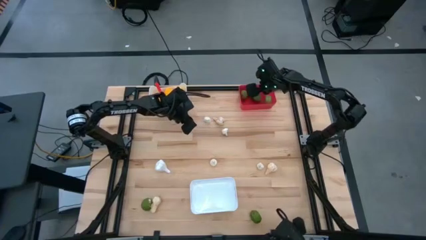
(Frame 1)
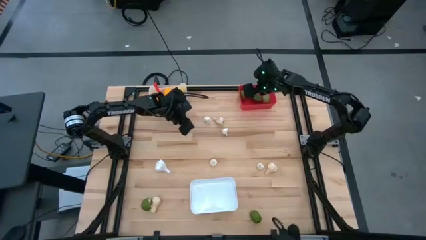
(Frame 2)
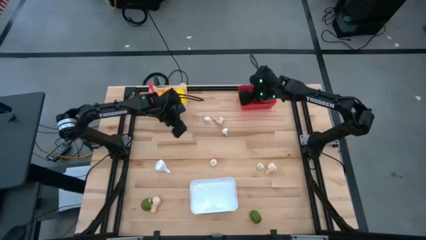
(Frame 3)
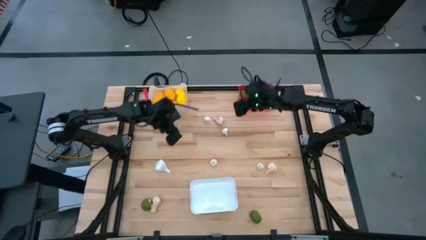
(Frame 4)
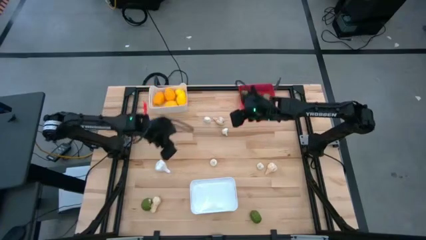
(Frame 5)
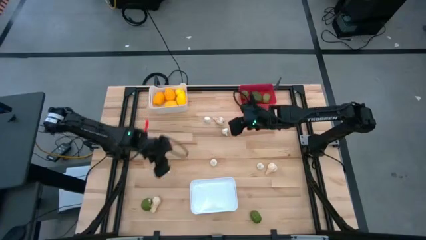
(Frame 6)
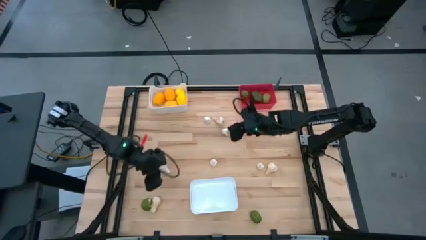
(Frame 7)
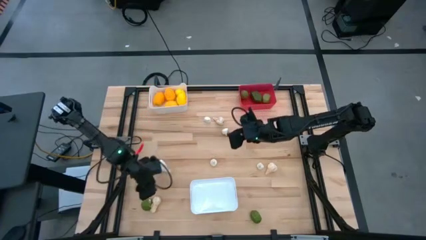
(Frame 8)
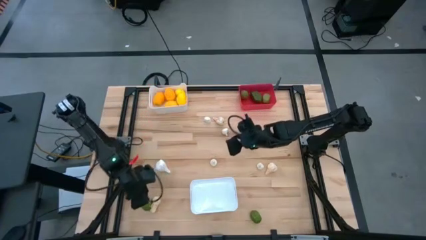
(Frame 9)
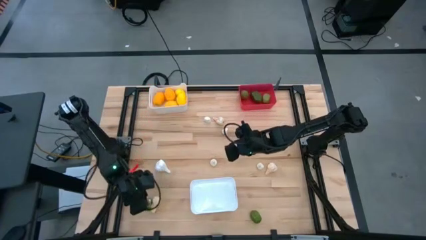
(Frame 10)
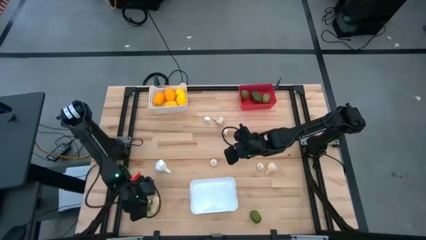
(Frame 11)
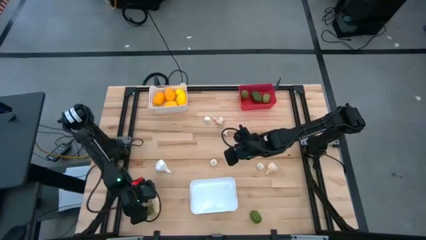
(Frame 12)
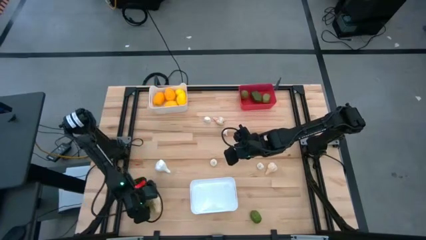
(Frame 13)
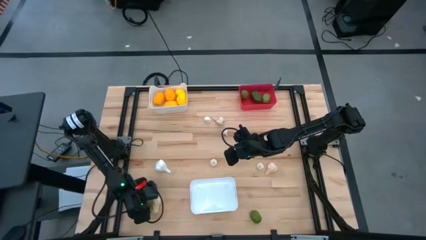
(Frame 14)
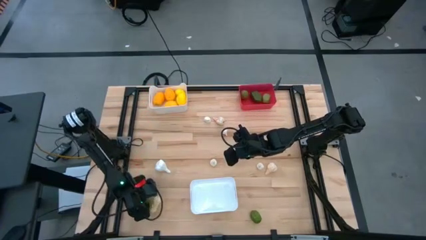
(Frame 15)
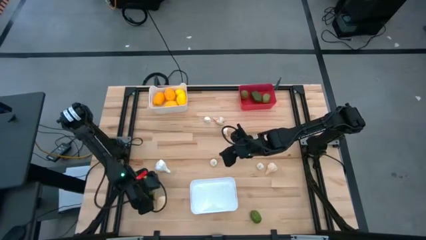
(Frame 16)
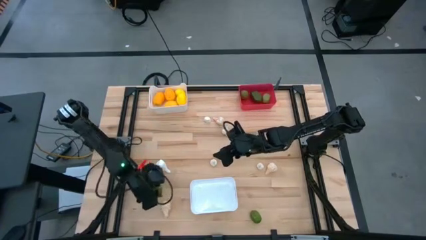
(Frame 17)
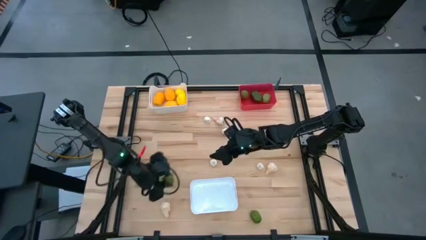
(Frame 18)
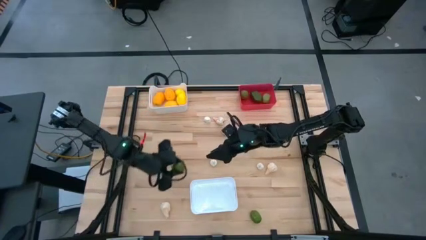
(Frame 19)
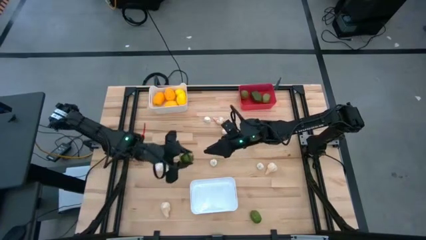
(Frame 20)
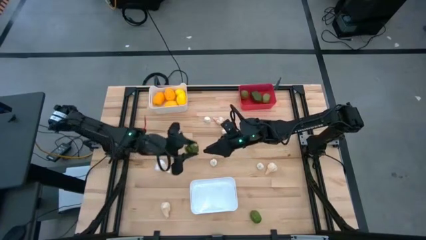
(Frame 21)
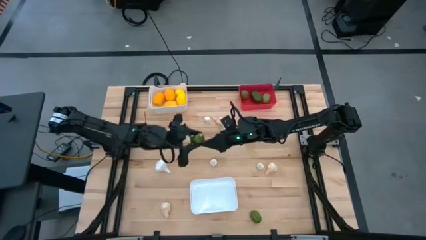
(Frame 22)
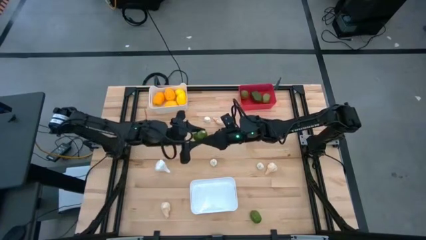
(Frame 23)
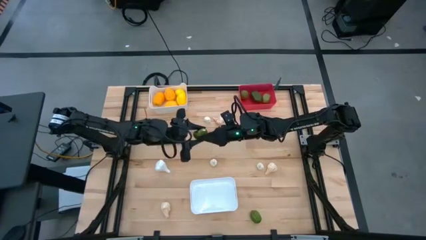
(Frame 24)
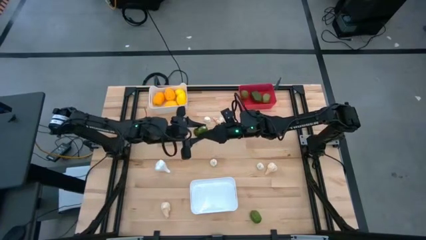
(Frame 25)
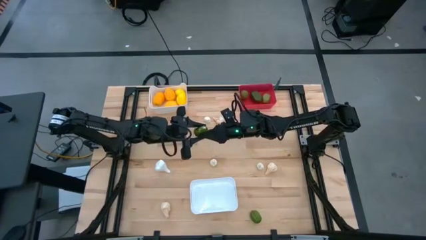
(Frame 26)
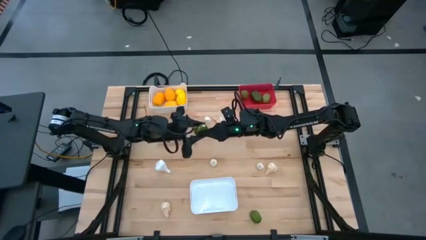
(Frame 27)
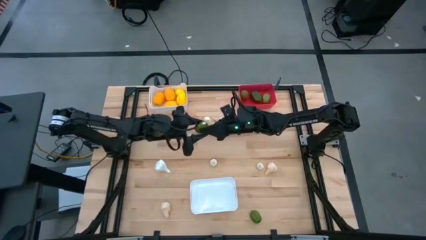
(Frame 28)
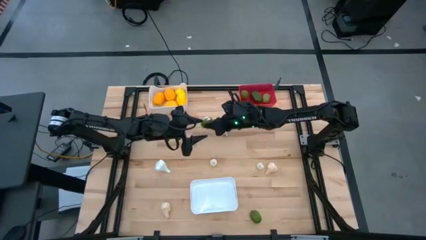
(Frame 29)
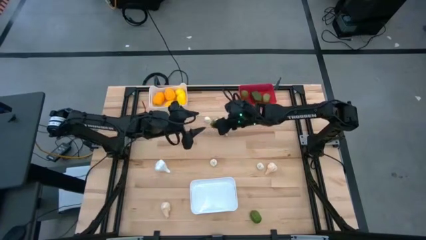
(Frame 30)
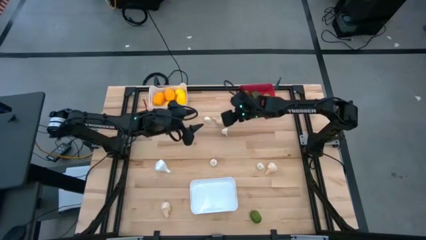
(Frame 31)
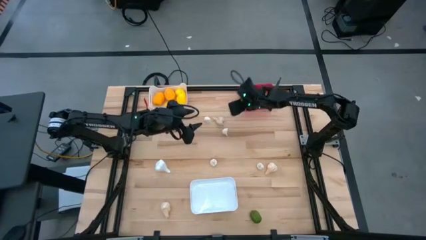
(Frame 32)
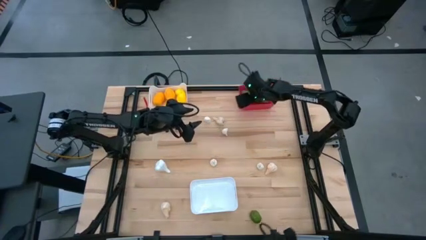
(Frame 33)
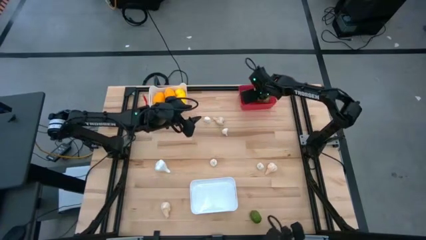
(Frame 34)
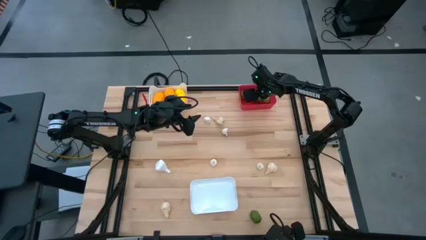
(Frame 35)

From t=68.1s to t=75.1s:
Task: Sort produce into baskets
Put the green lime into the red bin

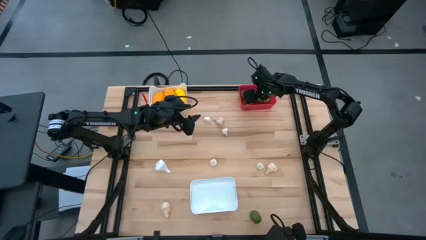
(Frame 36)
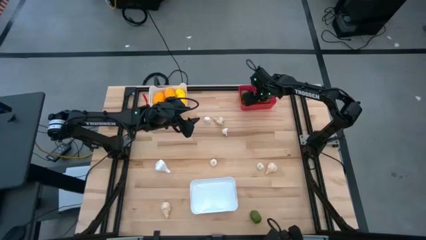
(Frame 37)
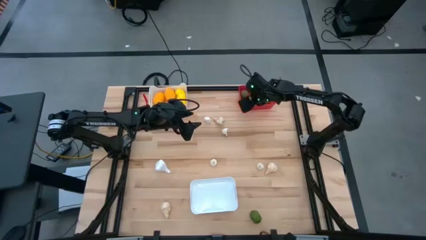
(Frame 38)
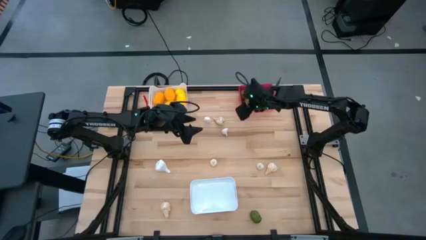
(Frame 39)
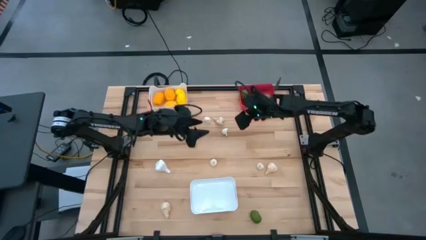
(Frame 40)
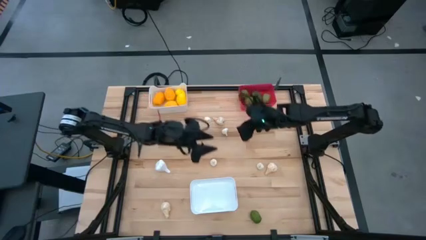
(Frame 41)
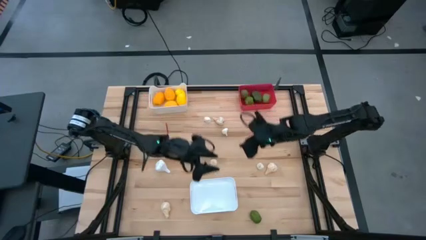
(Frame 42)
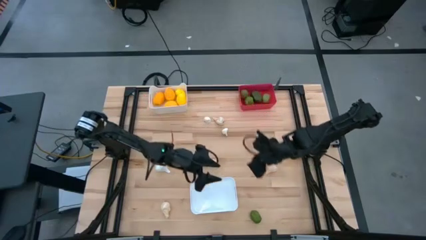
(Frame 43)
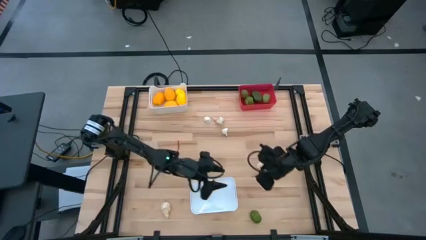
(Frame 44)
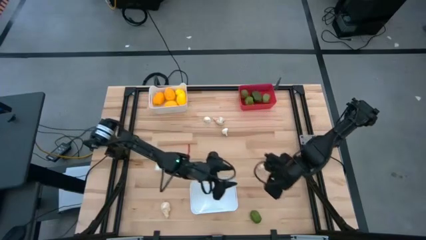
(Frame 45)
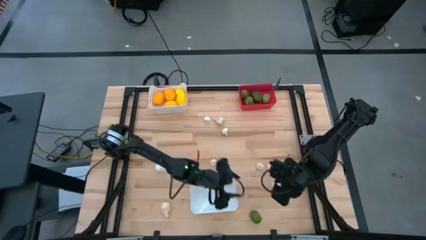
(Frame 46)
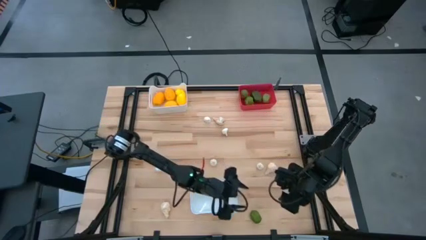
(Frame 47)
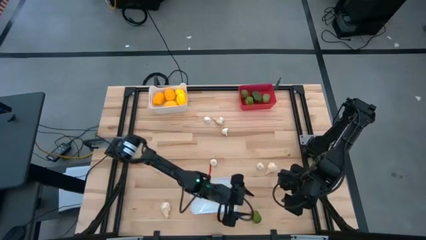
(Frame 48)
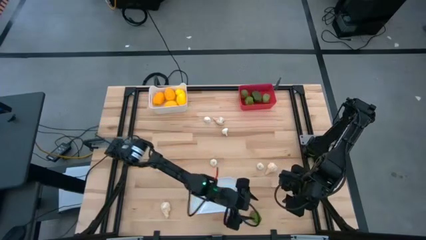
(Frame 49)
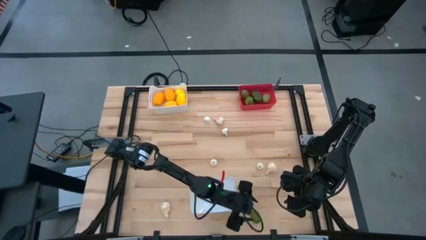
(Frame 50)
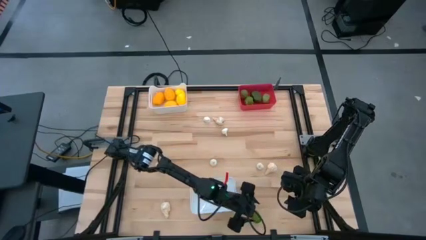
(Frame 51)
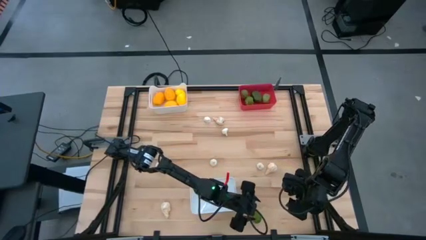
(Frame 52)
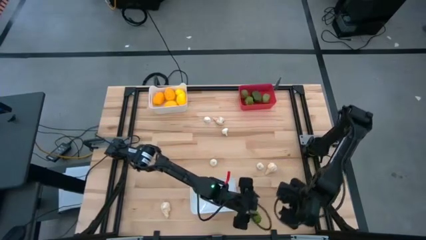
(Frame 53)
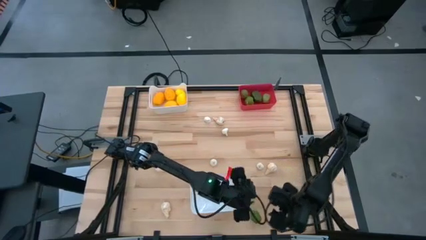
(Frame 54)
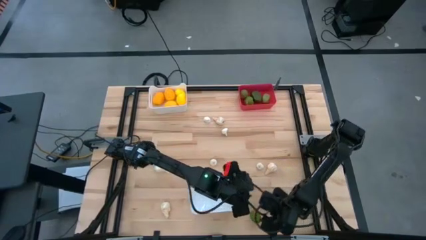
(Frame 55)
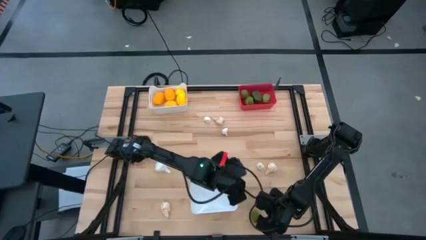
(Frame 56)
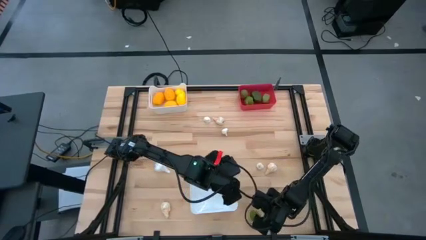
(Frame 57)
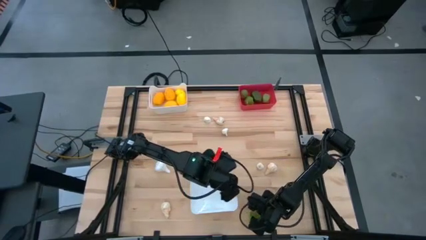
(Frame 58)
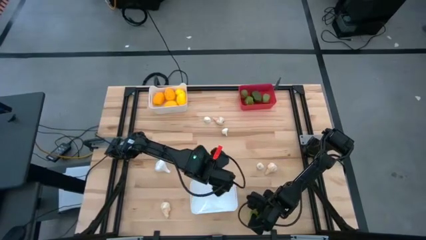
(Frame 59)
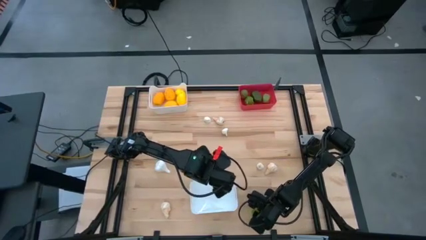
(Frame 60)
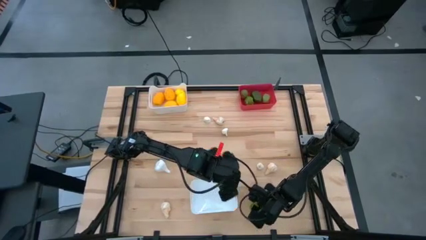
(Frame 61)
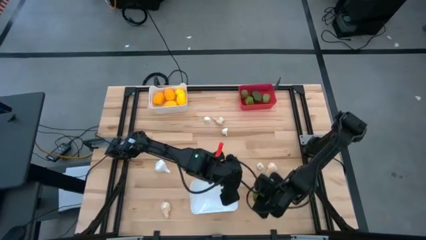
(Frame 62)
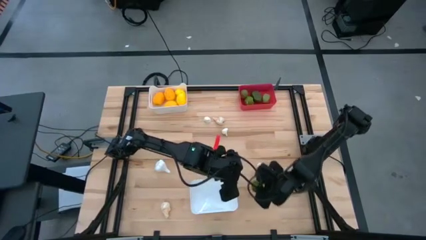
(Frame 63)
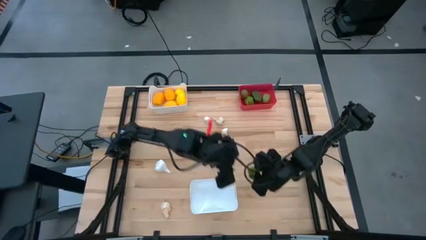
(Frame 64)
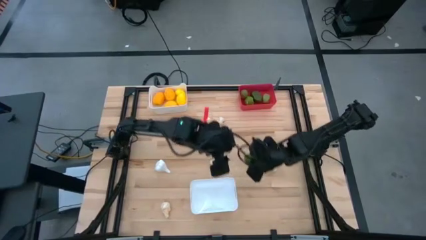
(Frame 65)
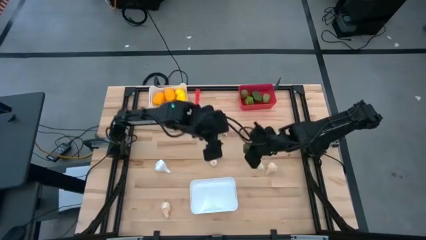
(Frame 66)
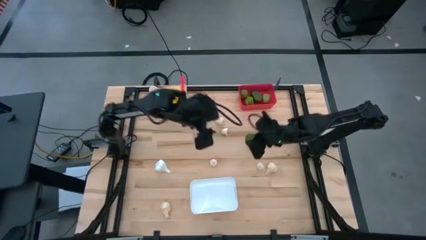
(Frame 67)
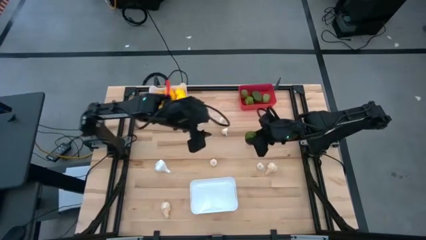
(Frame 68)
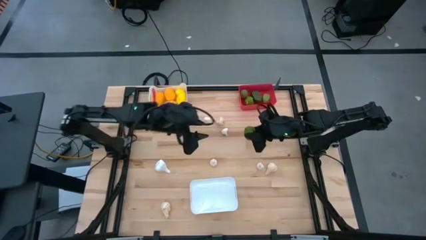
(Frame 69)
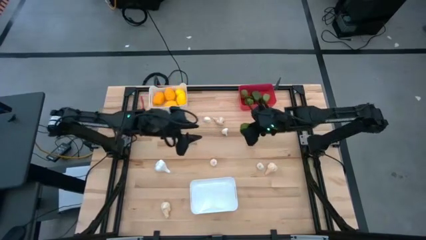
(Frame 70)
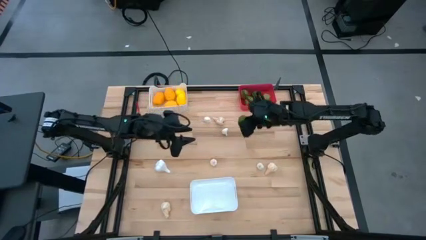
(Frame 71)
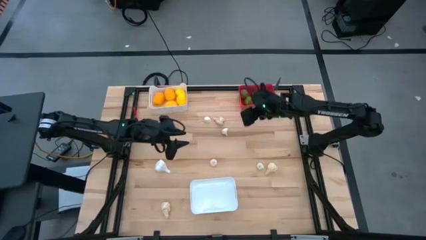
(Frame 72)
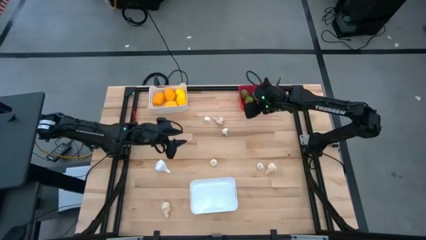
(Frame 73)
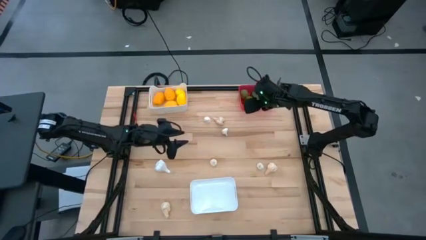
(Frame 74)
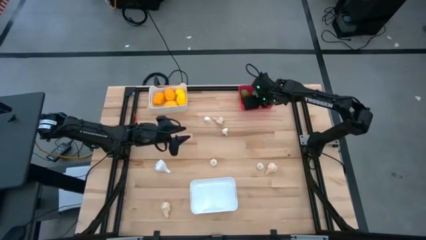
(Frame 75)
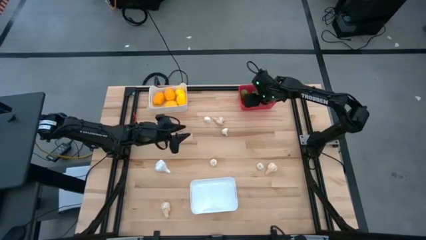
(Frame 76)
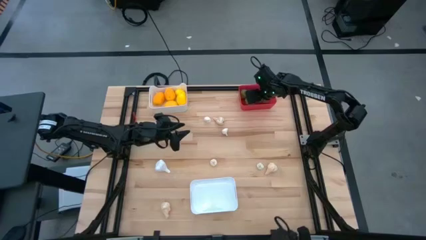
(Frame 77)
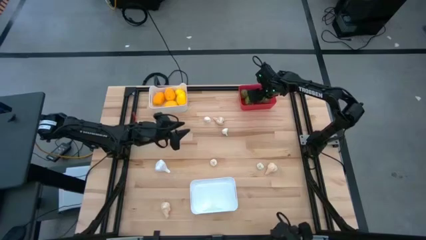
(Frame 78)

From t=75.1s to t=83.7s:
Put the green lime into the red bin

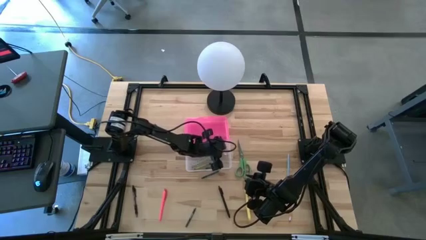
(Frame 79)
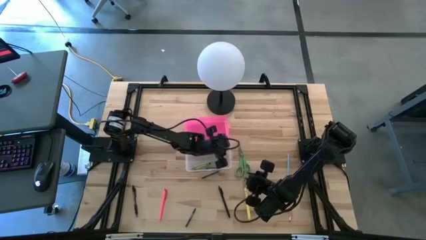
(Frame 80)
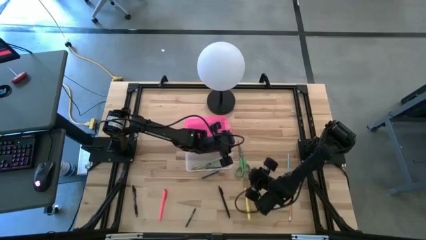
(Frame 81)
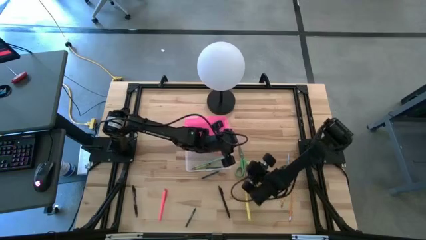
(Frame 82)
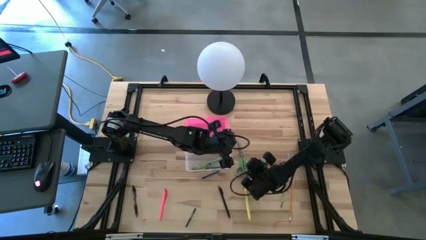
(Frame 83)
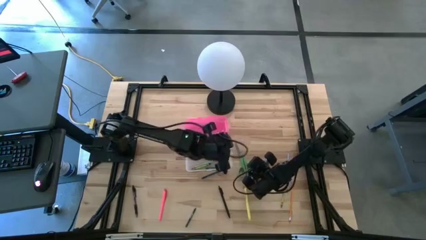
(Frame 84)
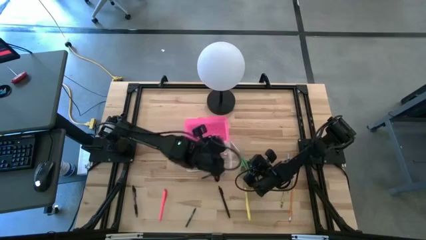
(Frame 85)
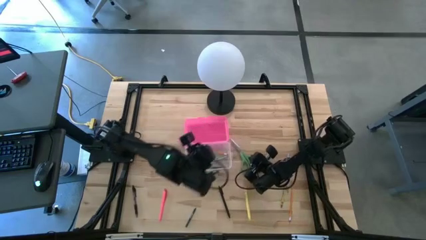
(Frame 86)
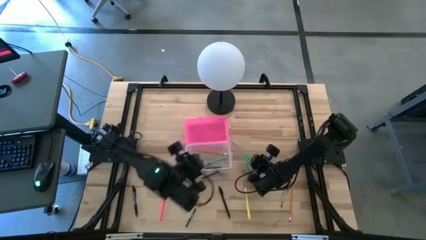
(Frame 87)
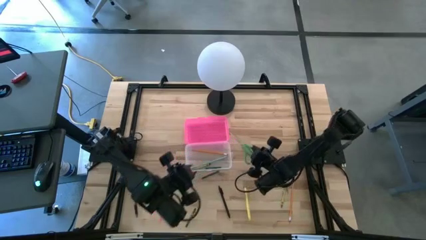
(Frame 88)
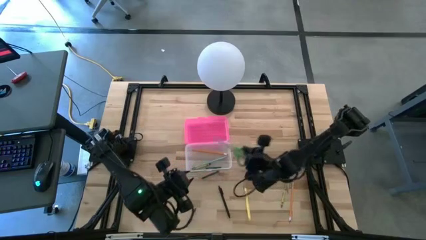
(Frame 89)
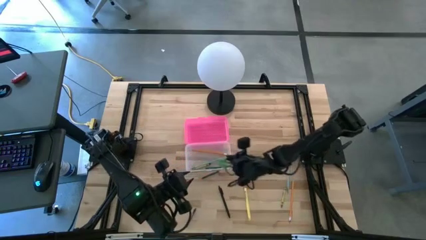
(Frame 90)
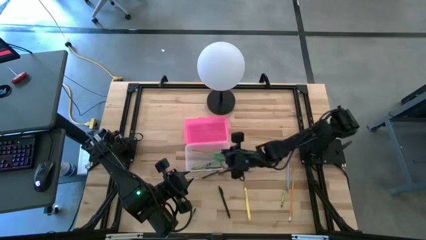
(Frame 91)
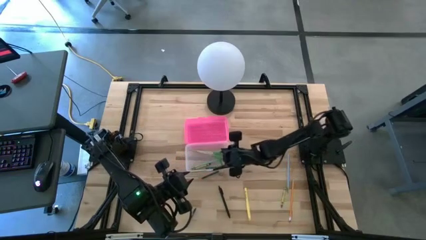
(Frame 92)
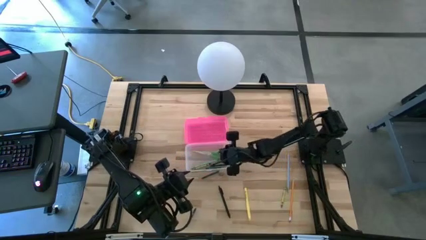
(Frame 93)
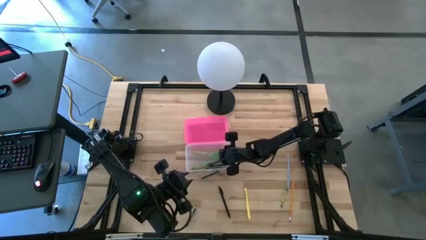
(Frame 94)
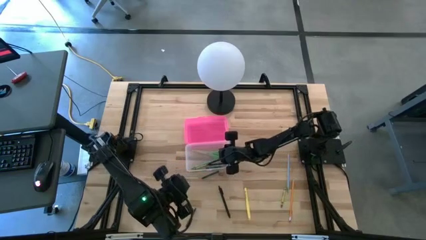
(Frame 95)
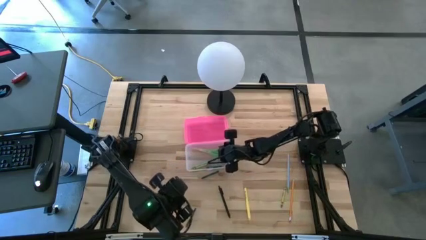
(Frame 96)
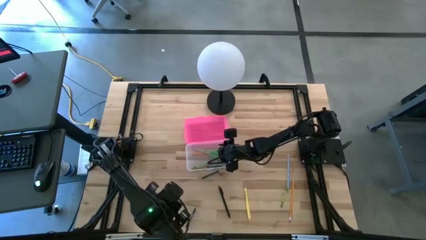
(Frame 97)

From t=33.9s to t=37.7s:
Task: Pick & place school supplies into a supply box
Put the green scissors into the pink supply box
